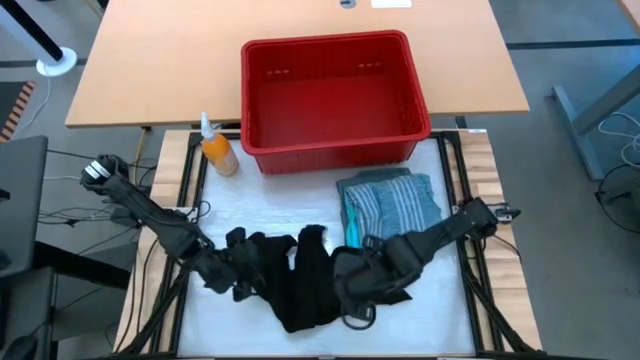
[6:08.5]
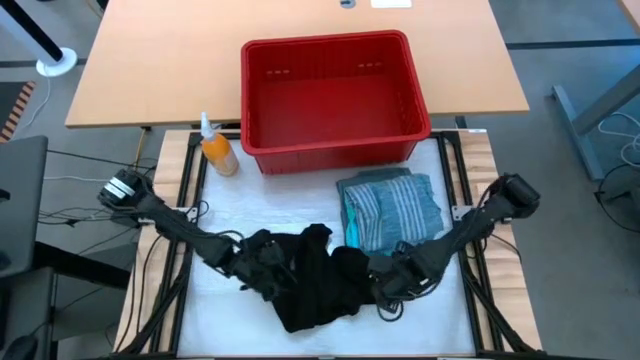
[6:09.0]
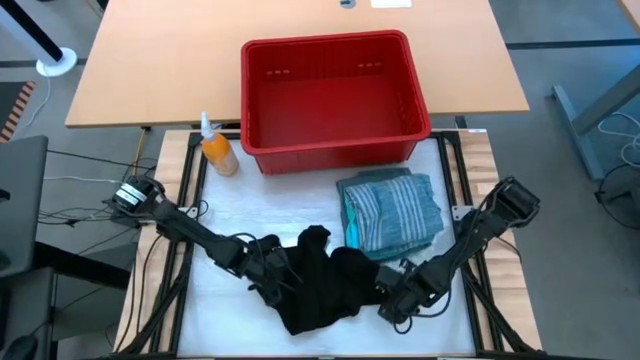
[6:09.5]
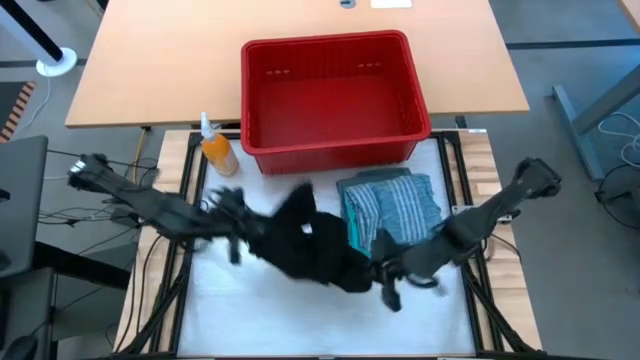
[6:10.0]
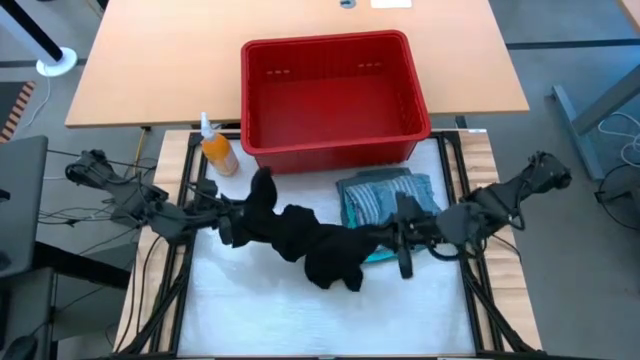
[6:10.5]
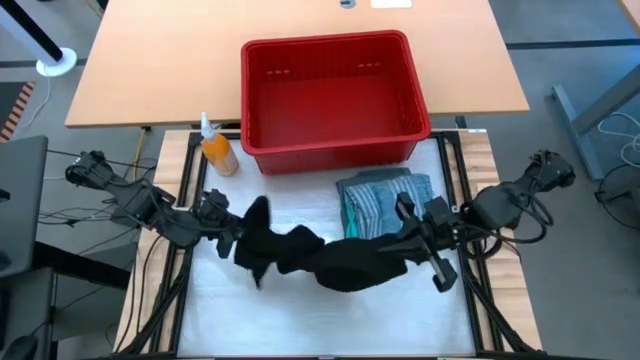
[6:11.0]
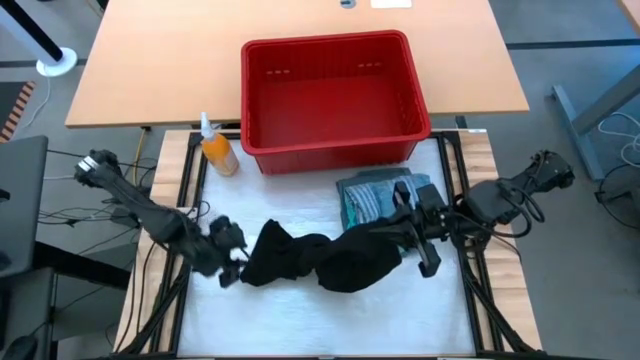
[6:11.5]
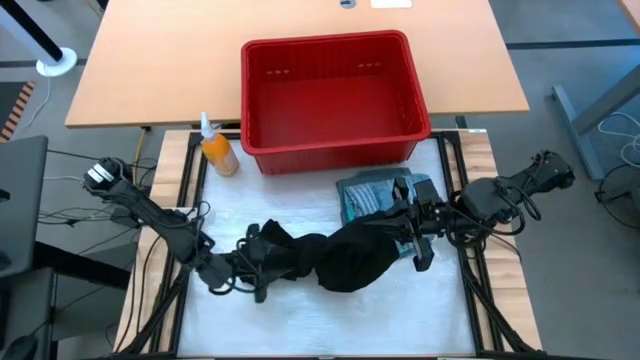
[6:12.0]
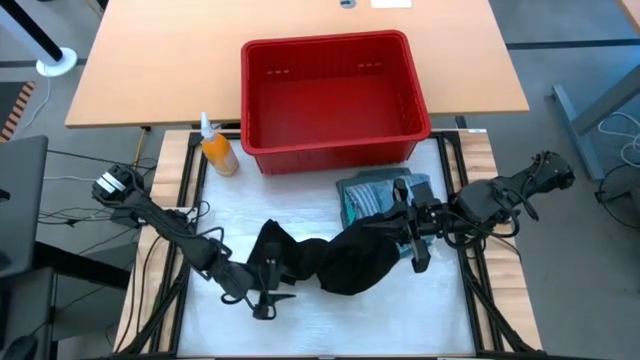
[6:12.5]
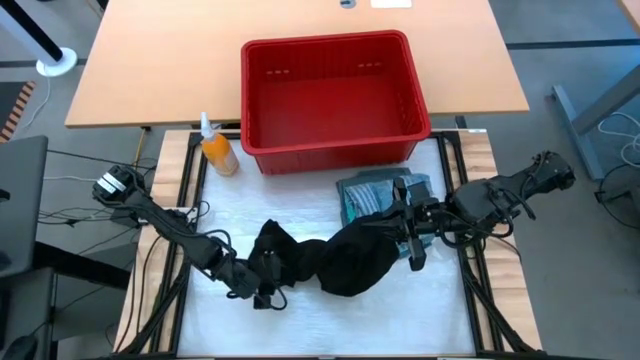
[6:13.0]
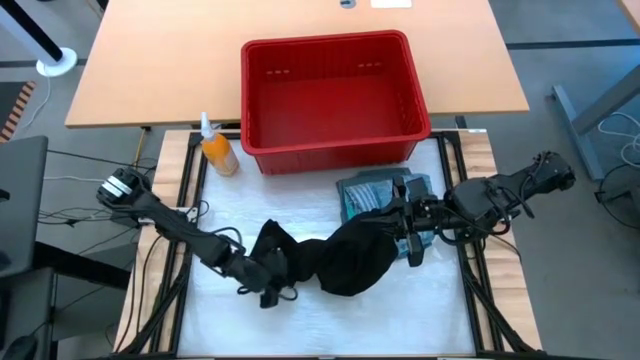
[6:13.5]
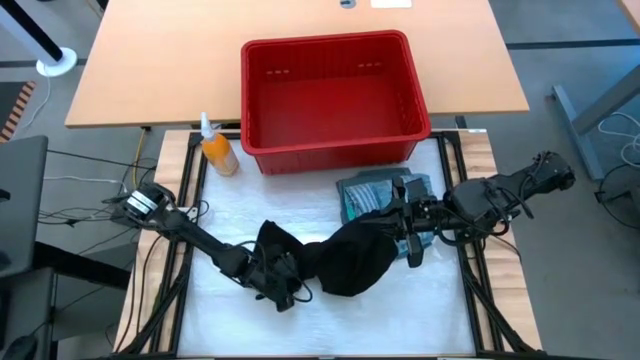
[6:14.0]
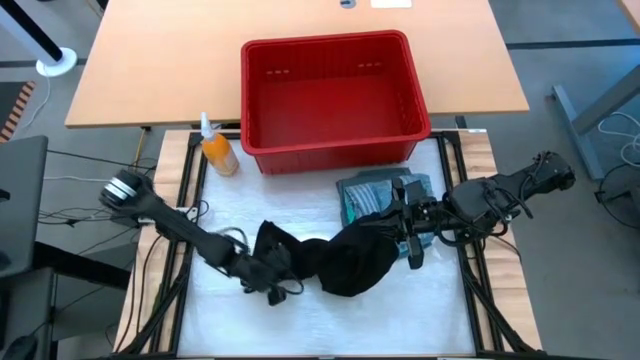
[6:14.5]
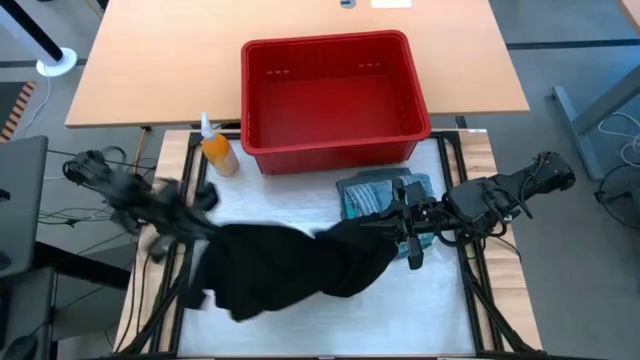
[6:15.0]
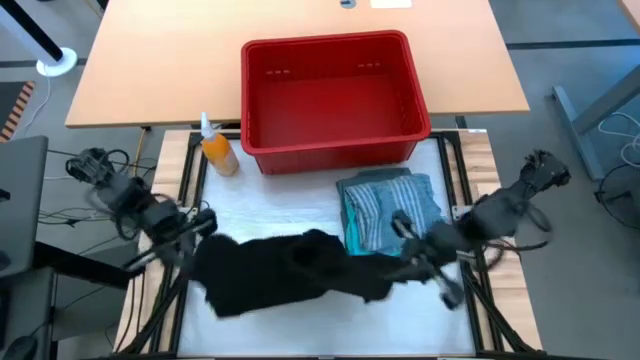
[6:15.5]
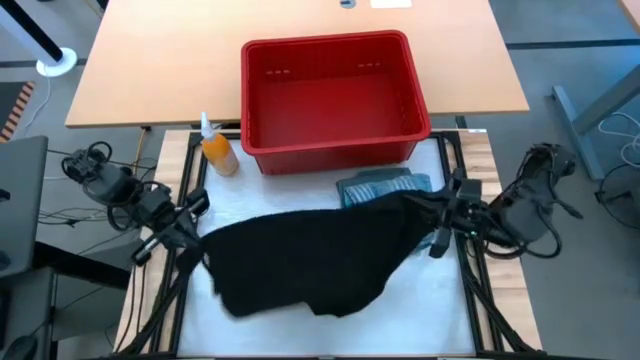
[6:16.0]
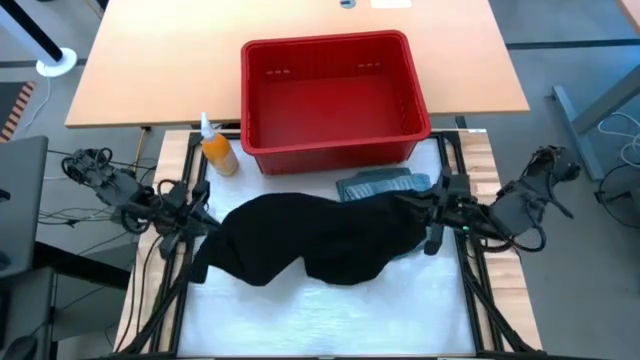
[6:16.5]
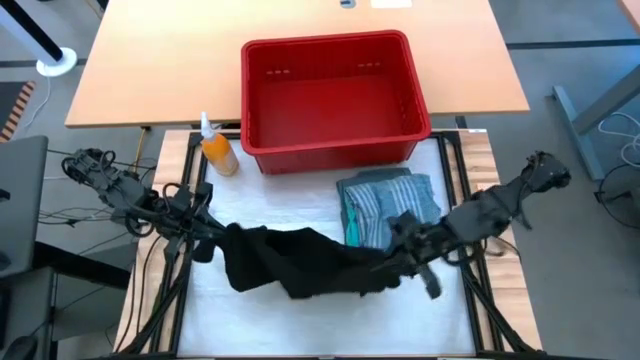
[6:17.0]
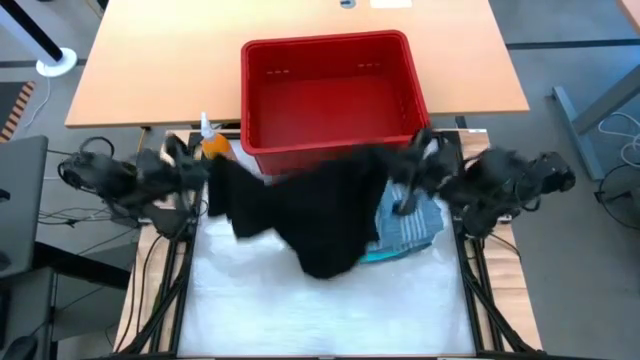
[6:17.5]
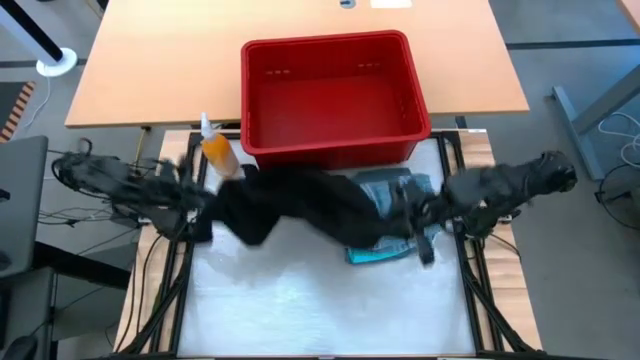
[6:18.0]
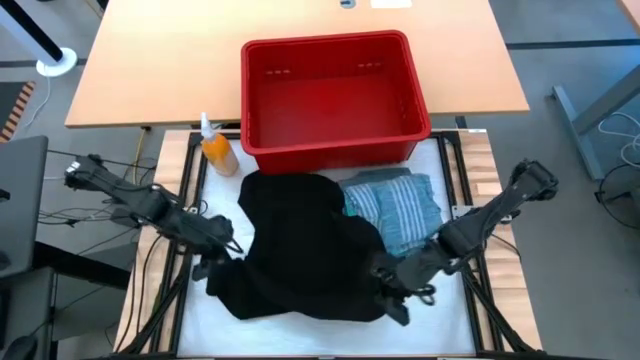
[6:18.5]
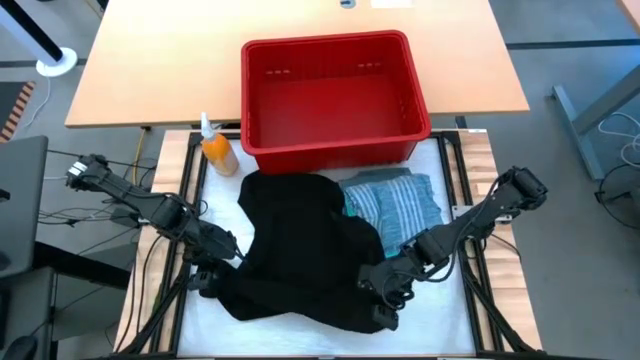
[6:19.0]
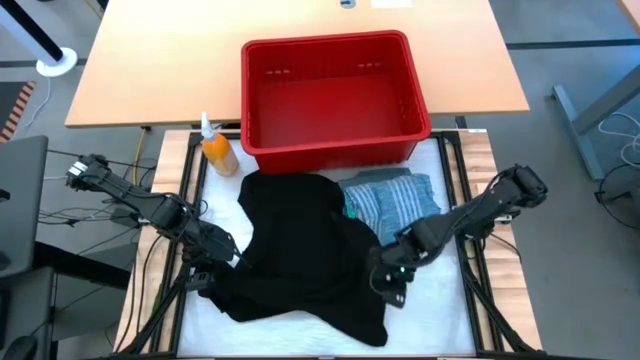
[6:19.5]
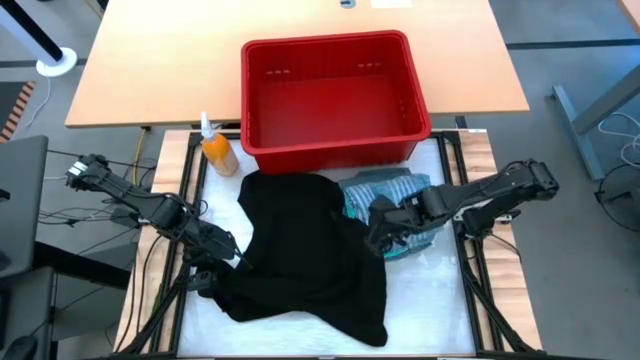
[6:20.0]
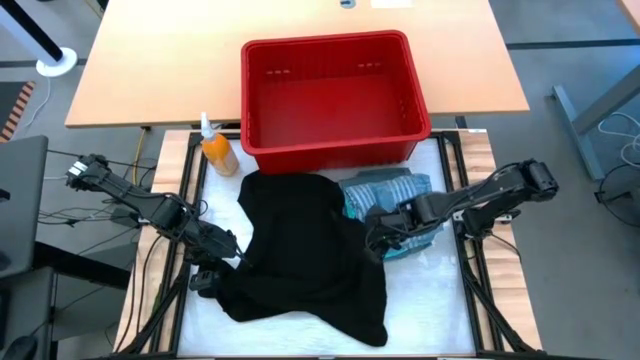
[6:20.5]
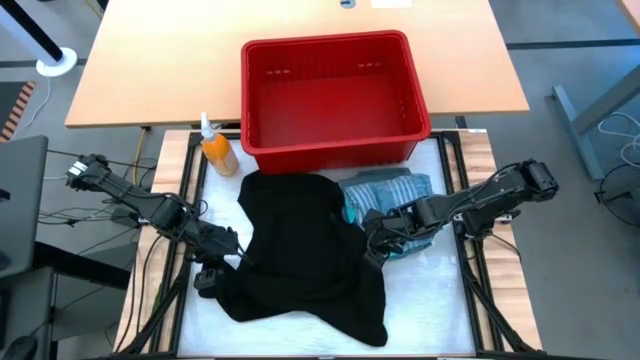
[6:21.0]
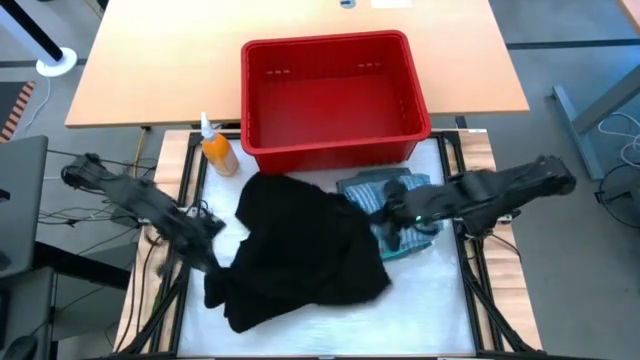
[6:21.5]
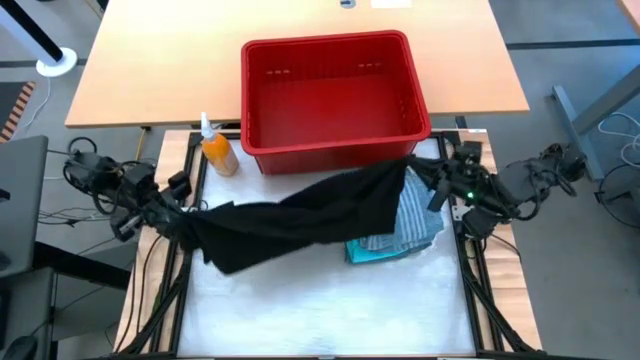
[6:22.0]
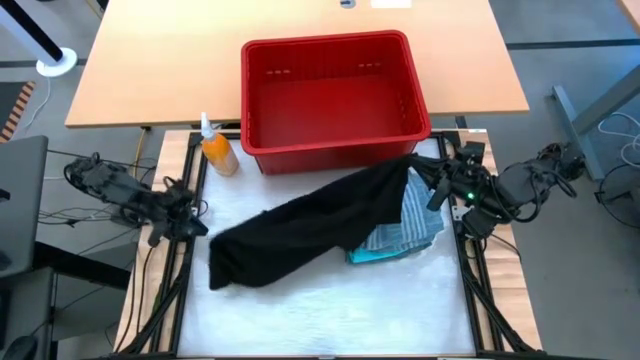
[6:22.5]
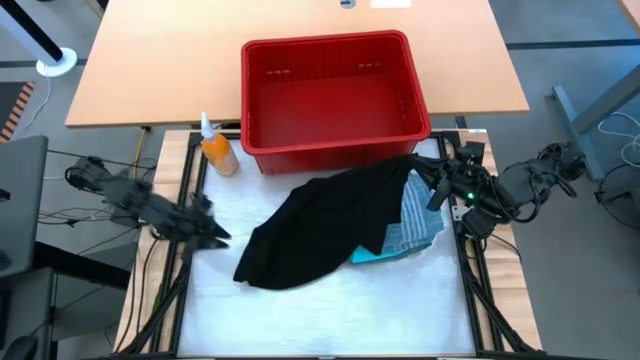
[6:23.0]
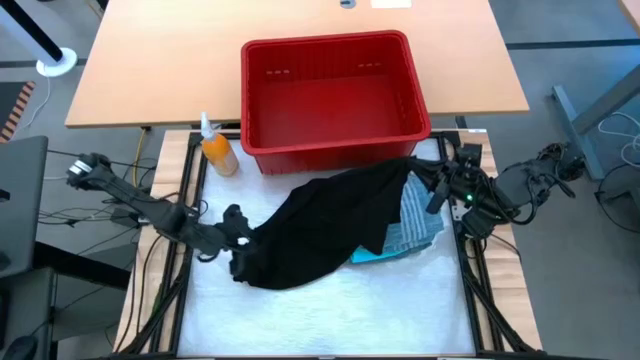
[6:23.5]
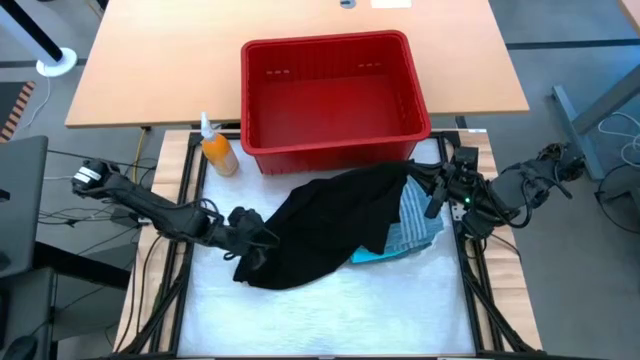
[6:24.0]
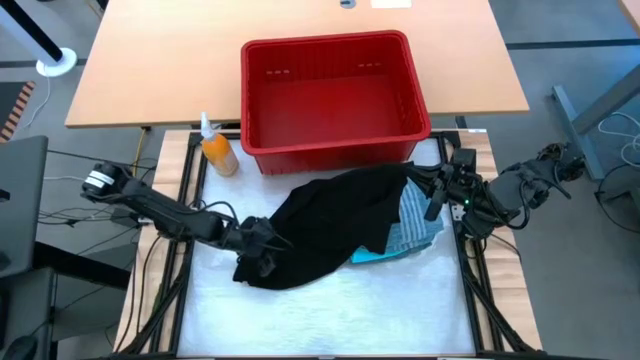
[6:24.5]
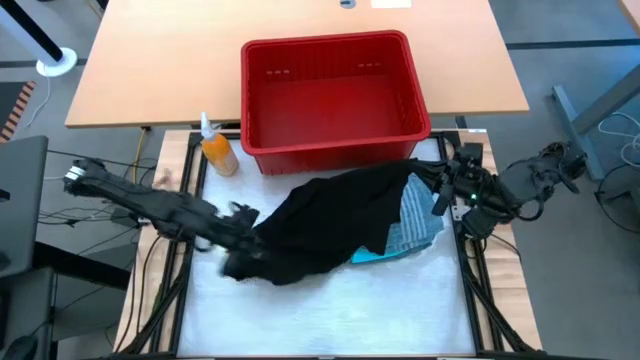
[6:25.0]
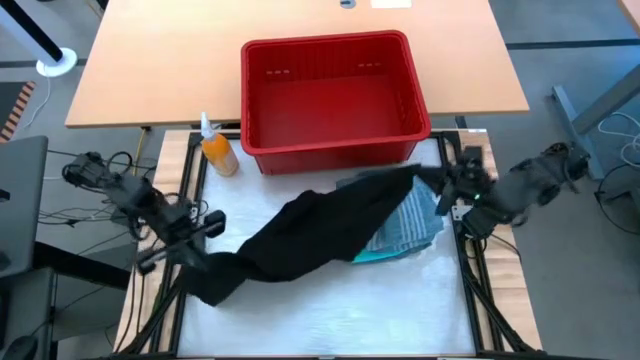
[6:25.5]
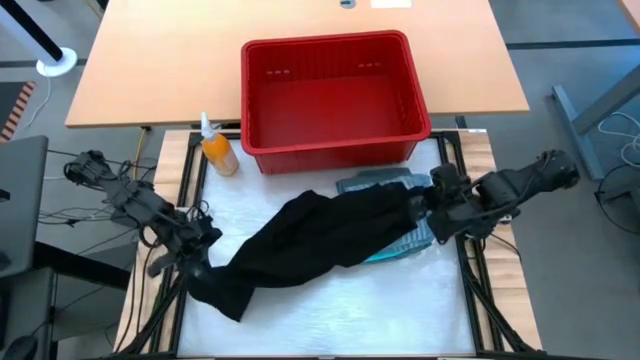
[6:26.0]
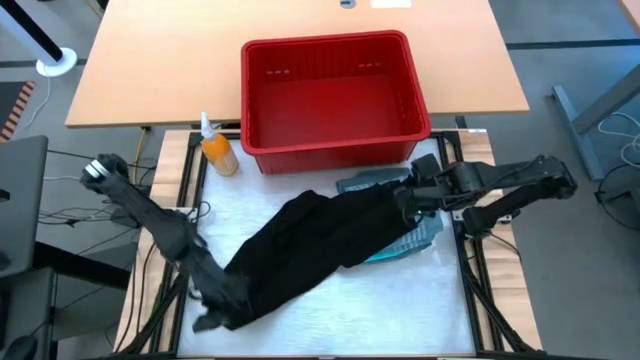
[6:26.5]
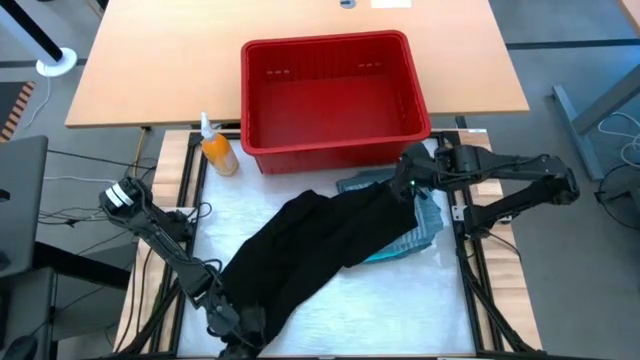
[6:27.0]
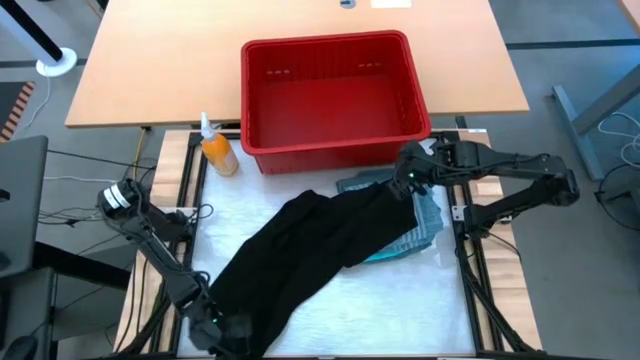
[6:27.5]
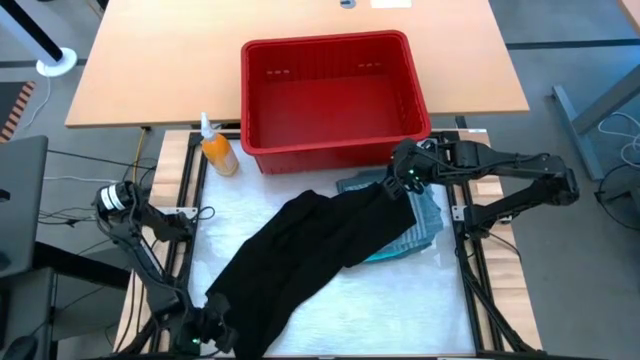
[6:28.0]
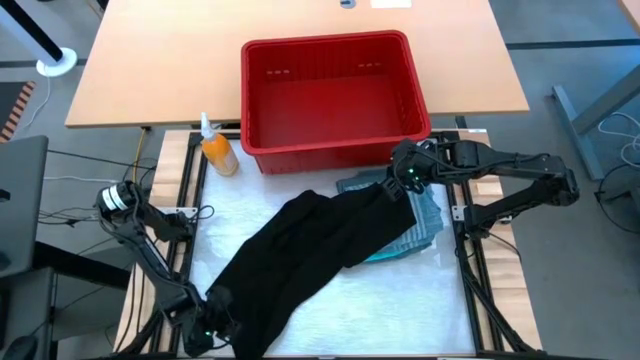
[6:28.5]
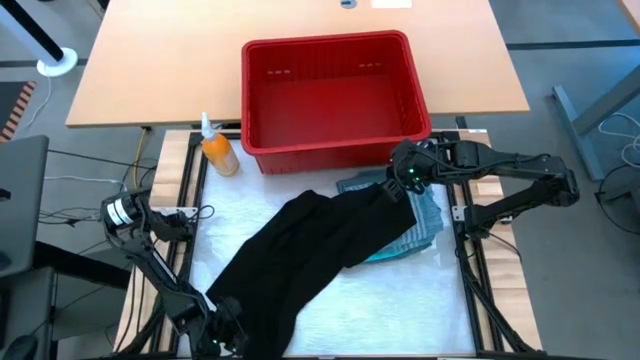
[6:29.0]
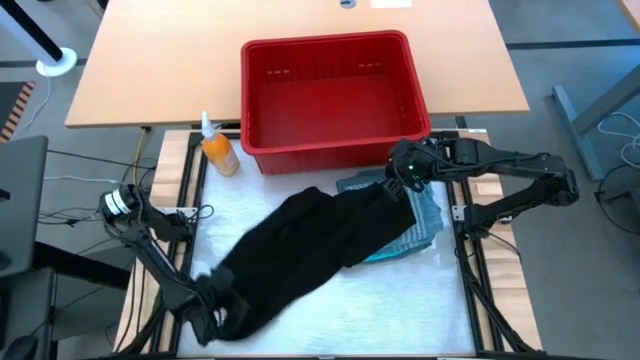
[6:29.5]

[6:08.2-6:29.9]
Task: Fold Laundry from Bin
Fold the black shirt

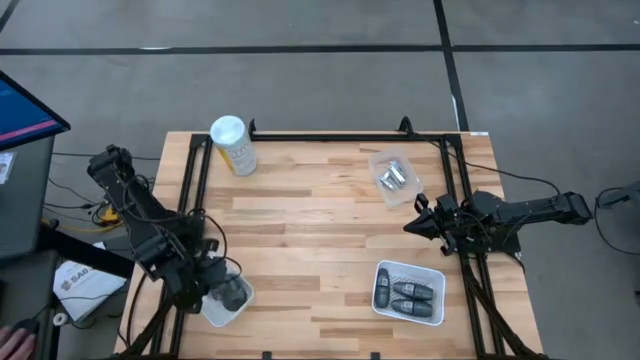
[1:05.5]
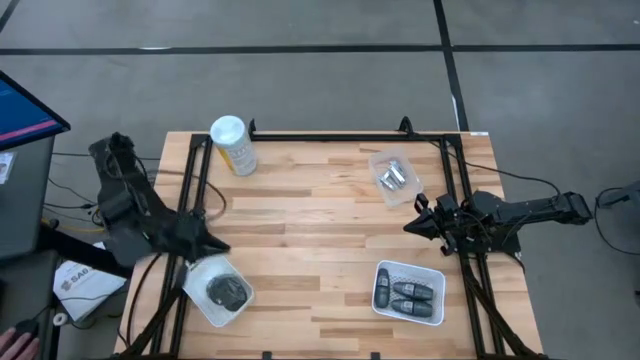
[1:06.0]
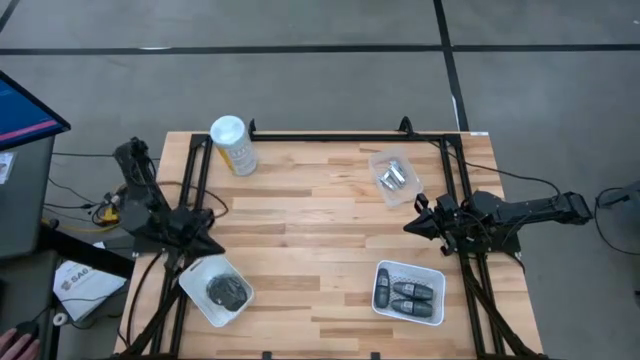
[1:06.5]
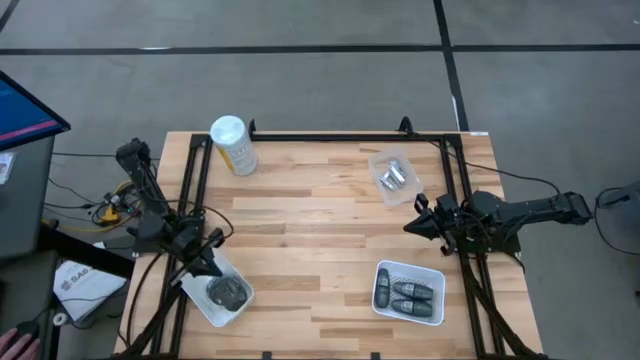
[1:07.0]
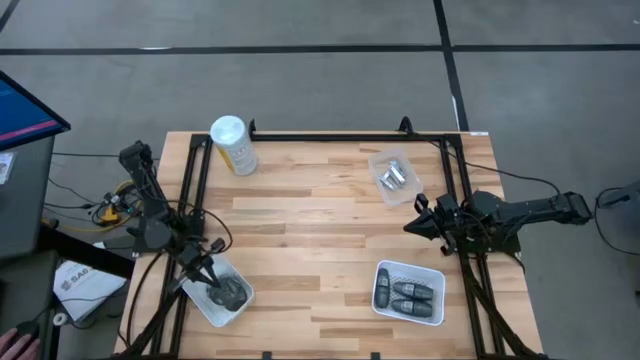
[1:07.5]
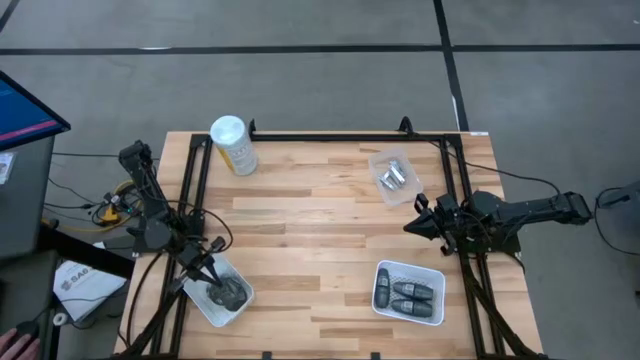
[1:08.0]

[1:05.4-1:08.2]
Task: Pick & Place Travel size toiletries
Return to Home Position
